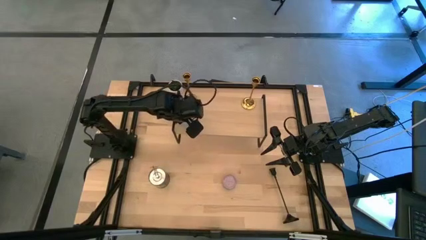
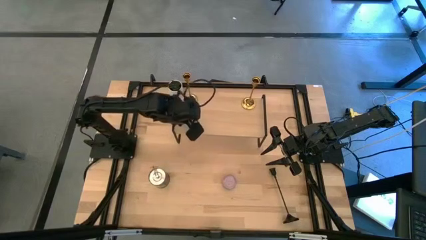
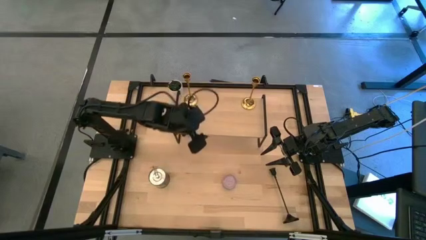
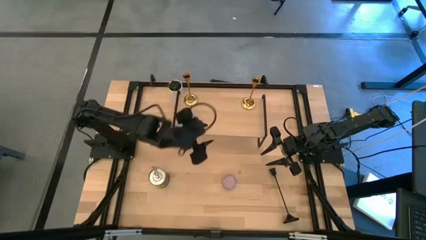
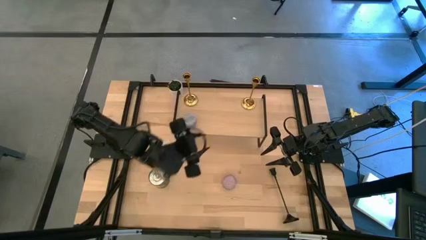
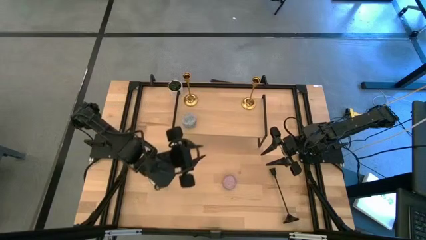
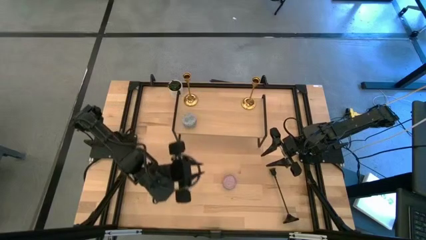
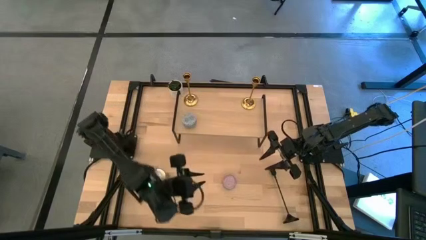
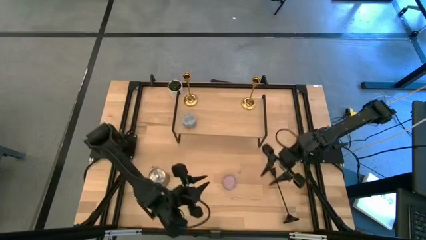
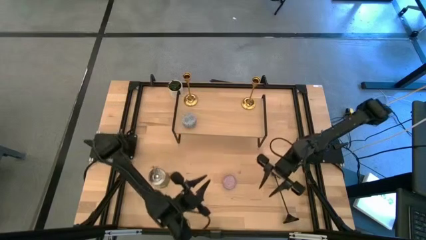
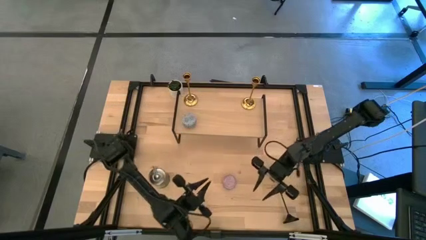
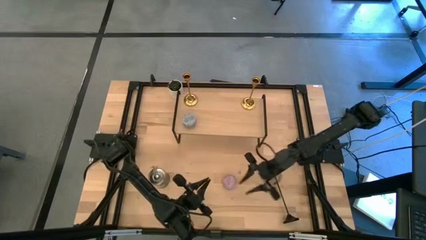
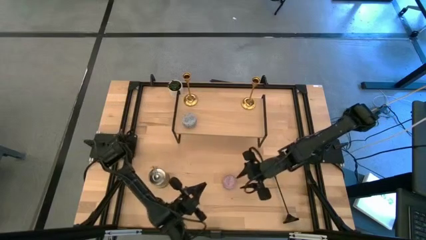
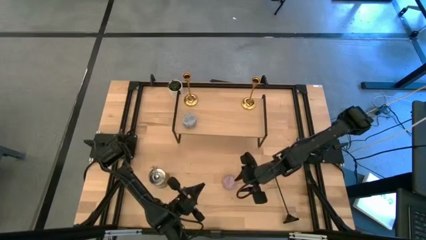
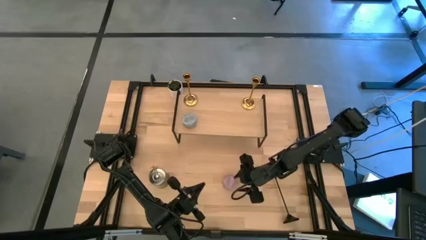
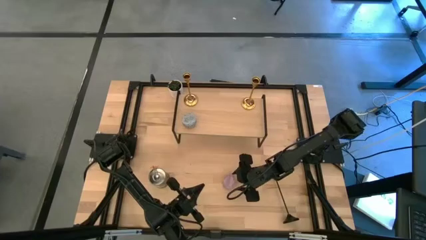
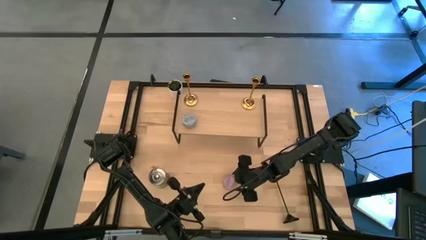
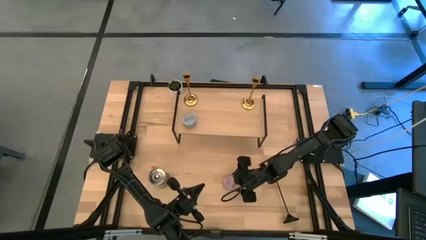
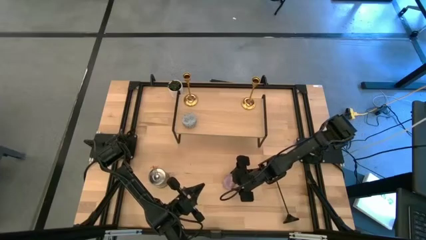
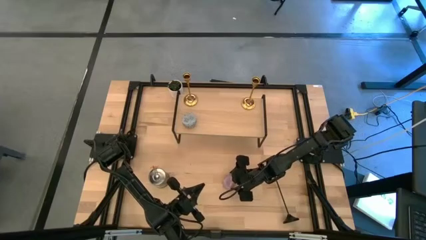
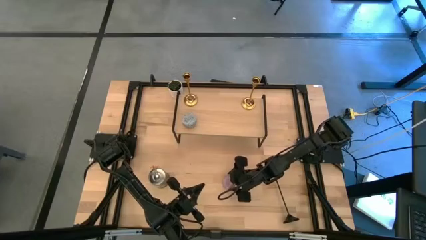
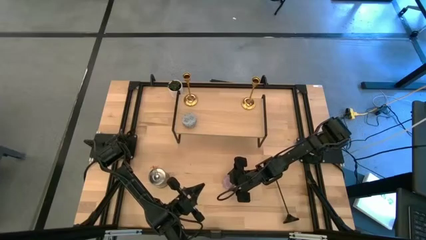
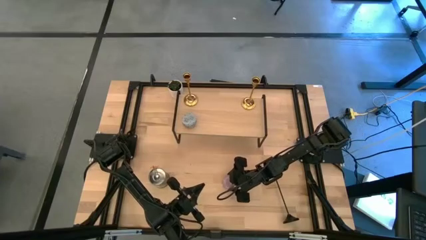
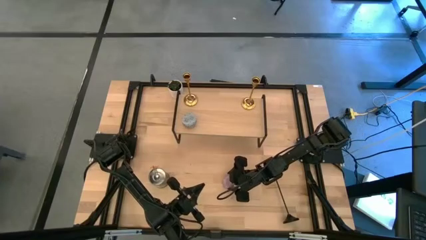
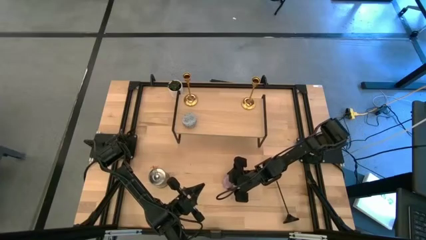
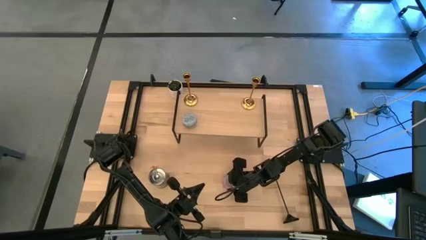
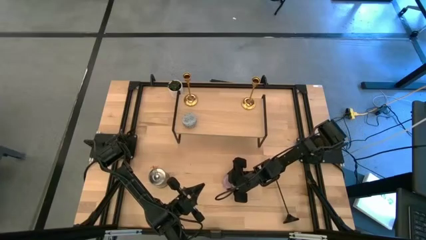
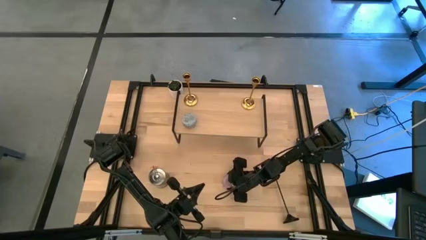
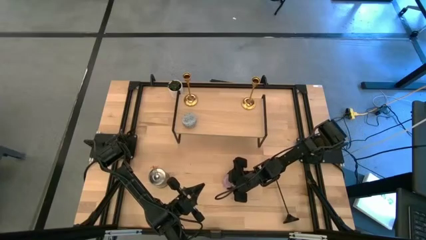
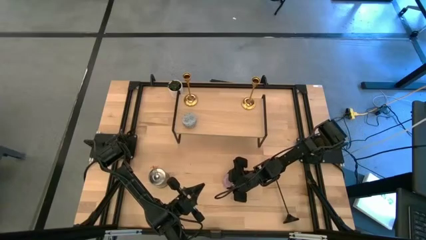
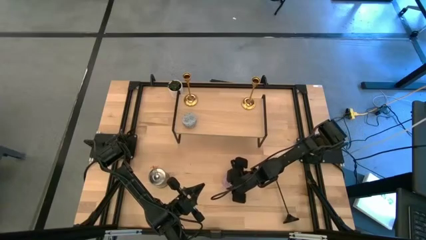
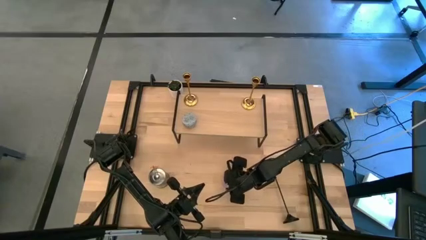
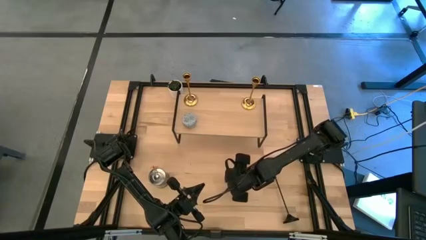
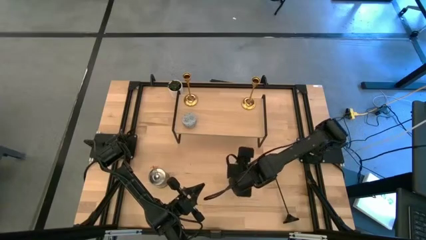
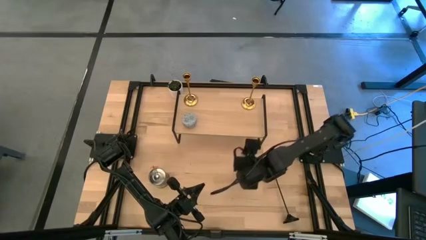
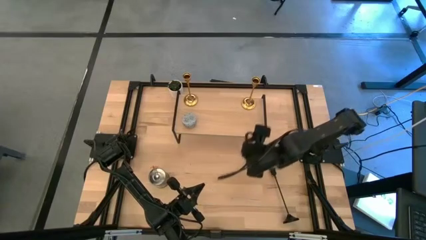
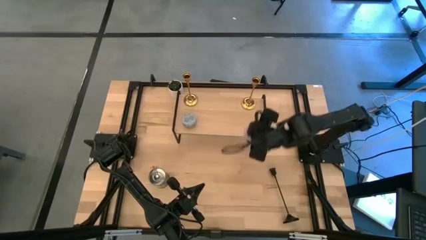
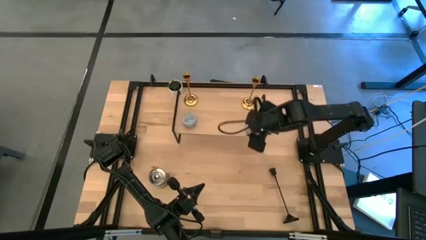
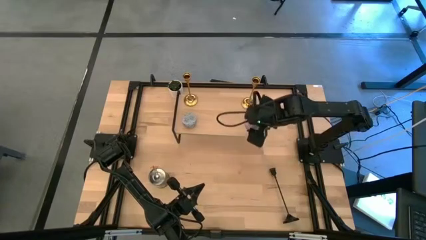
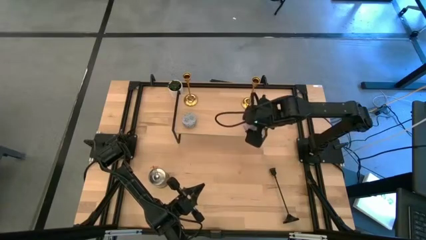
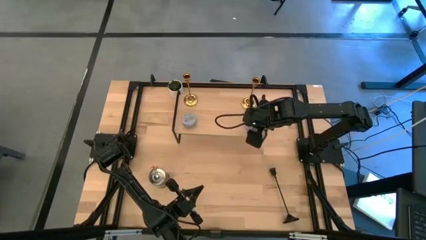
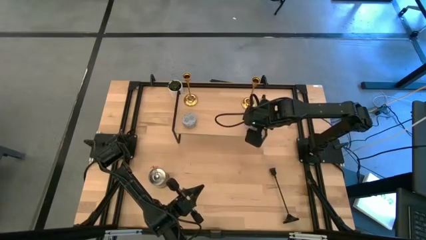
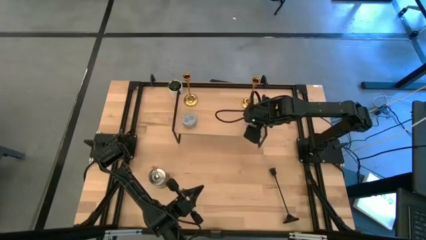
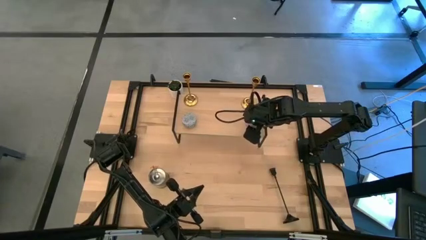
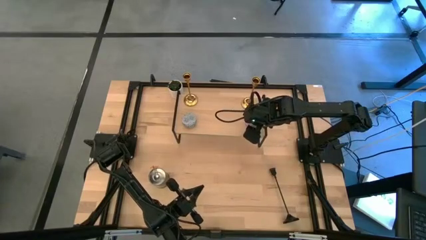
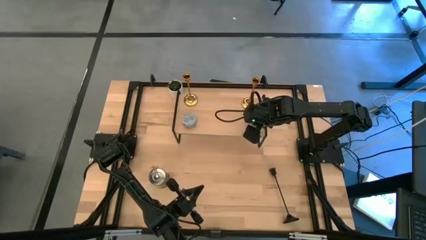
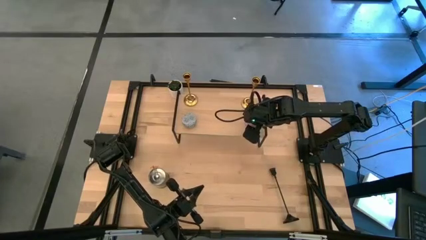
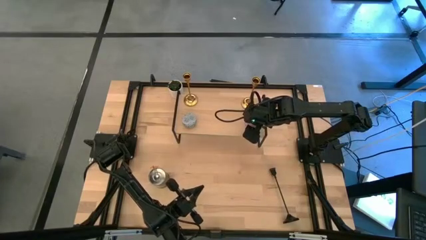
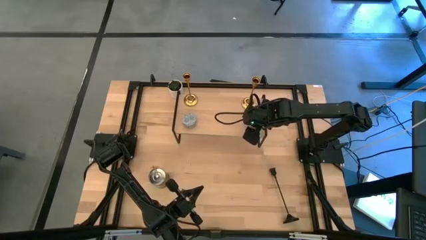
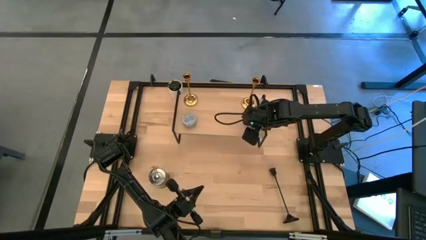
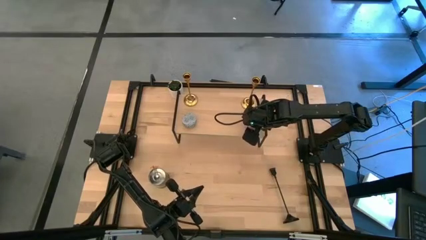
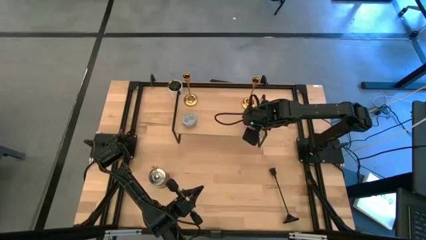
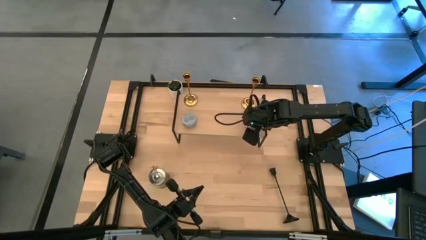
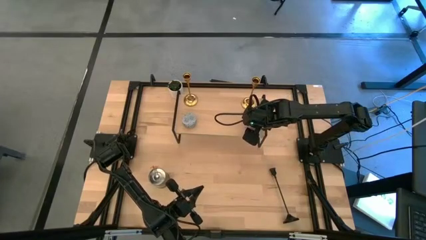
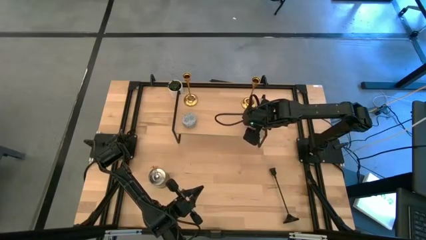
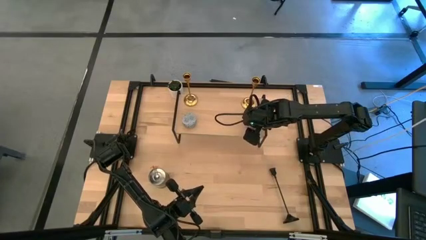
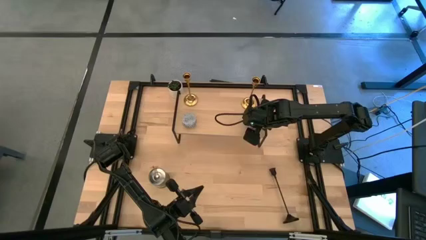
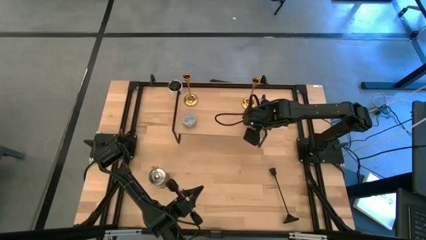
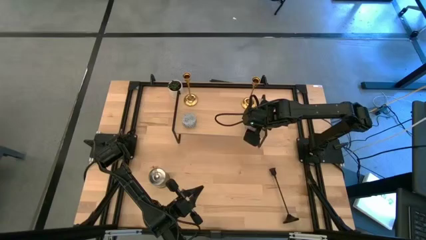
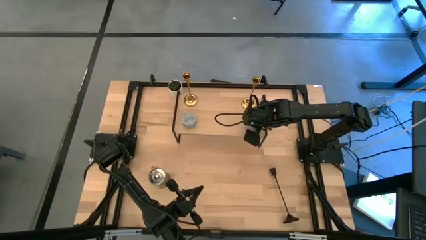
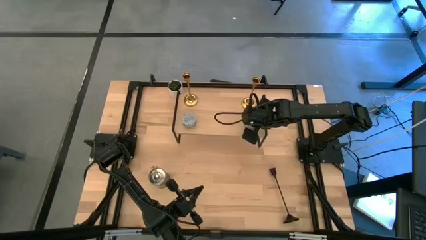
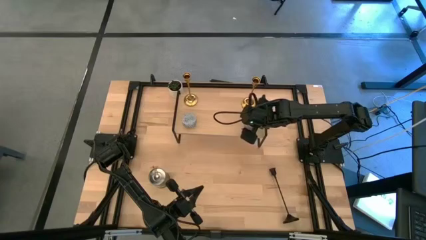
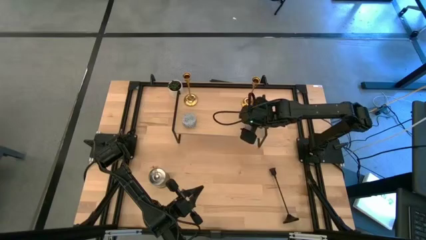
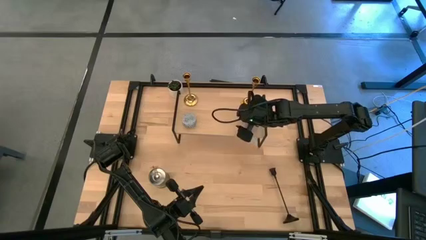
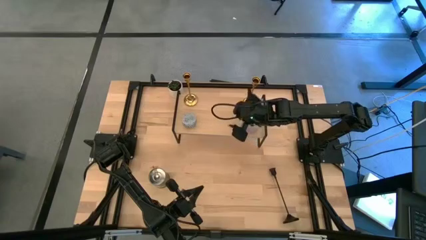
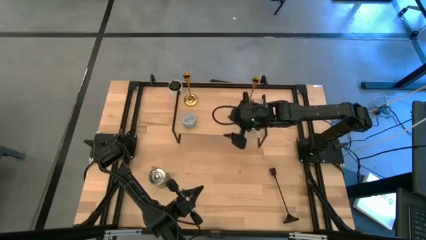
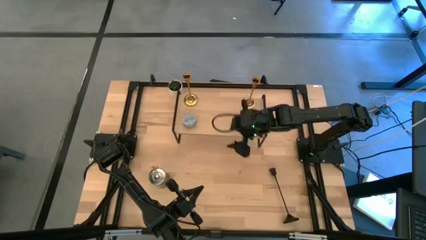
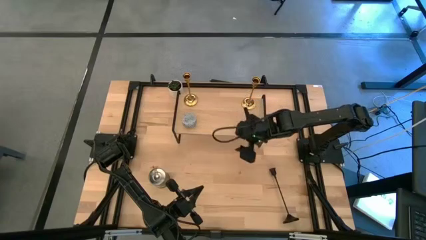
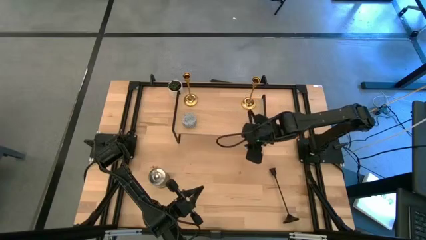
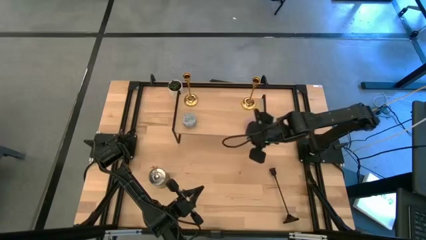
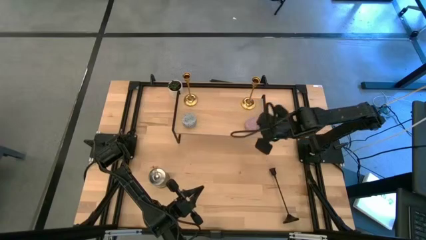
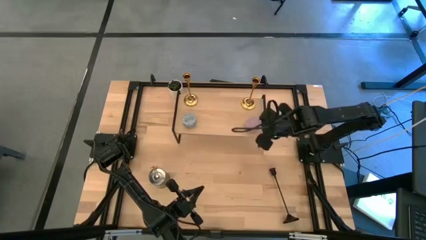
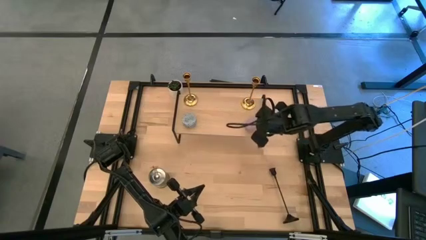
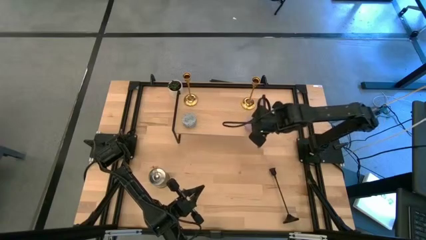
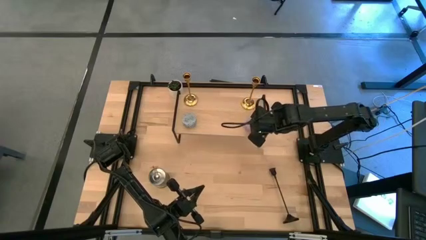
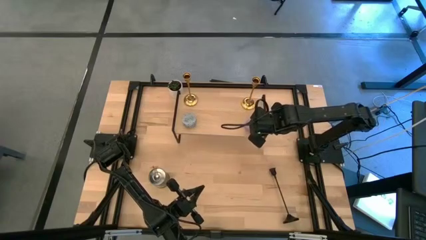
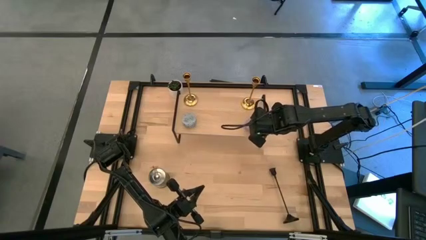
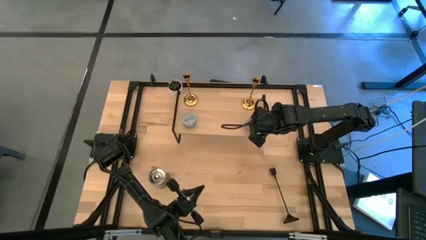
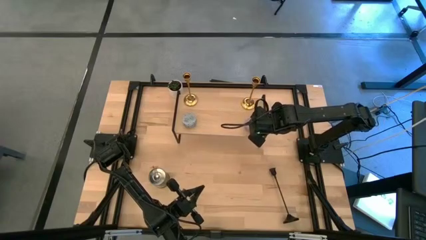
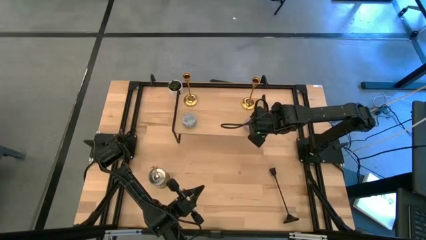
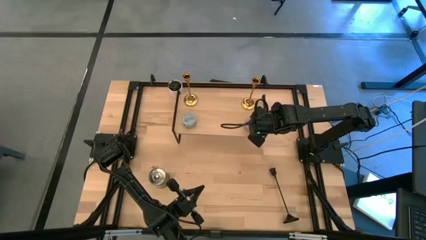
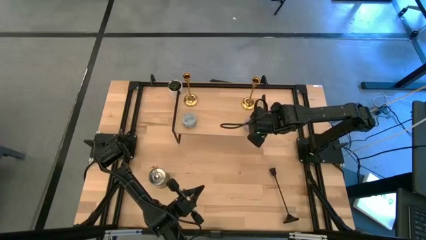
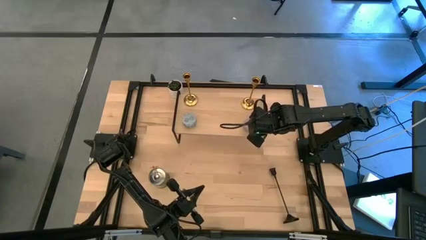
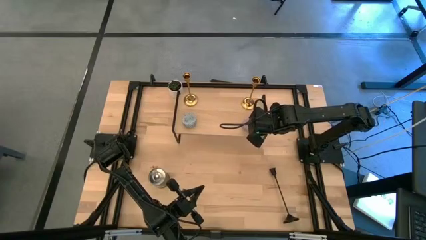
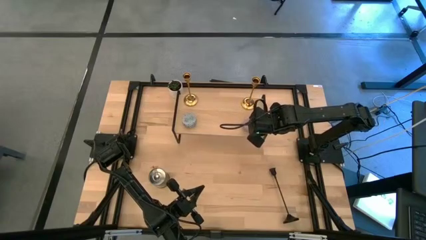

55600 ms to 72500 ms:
Task: Pick & Place candle stick holders
Put the pink scented candle on the shelf
